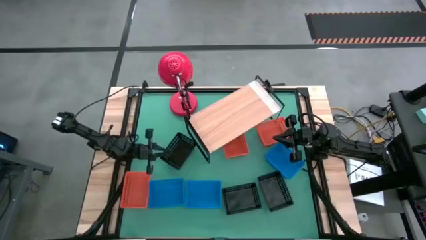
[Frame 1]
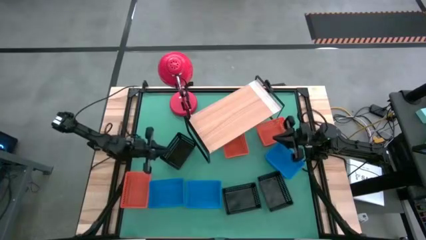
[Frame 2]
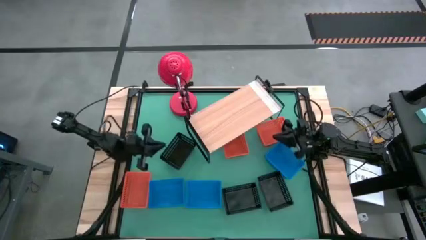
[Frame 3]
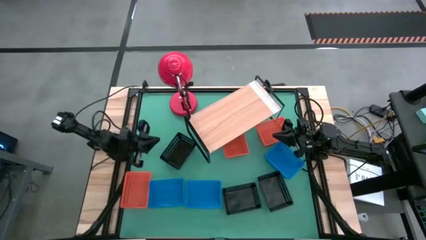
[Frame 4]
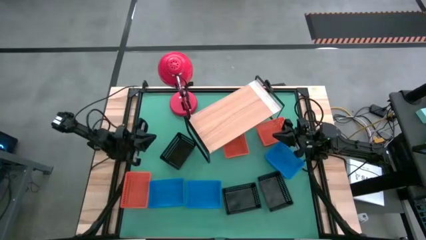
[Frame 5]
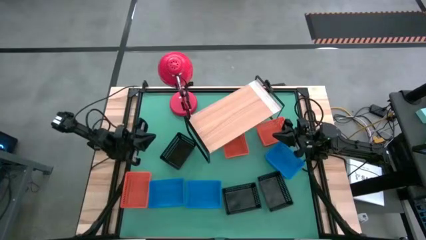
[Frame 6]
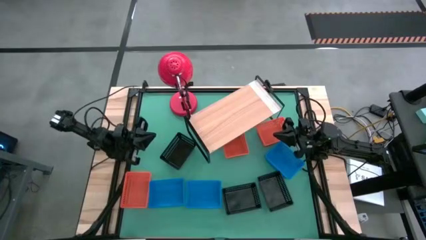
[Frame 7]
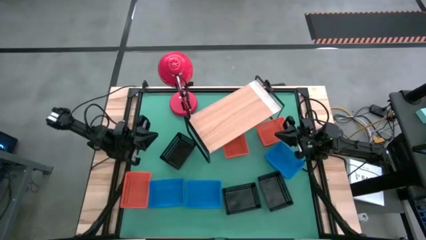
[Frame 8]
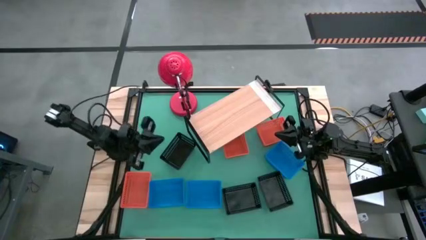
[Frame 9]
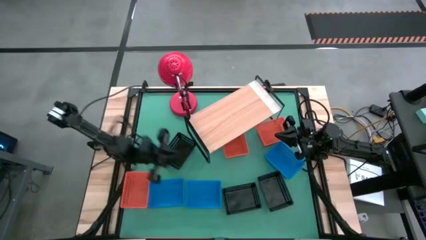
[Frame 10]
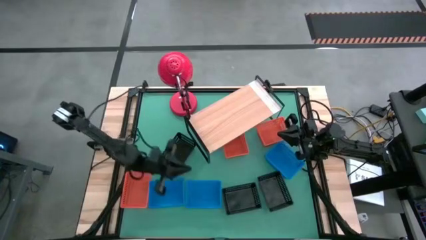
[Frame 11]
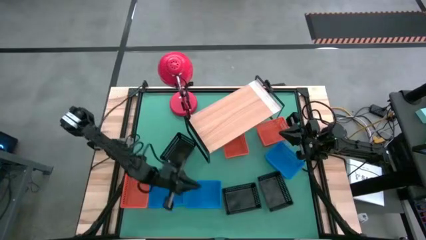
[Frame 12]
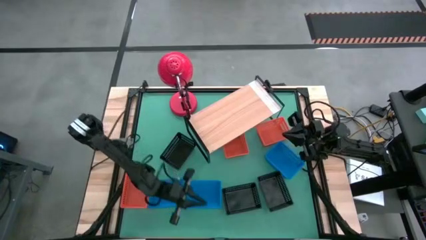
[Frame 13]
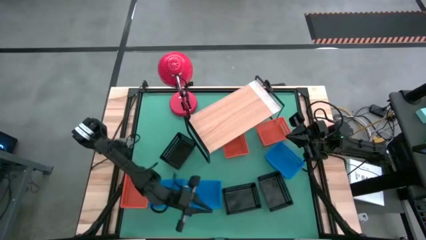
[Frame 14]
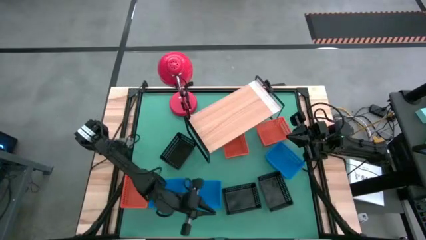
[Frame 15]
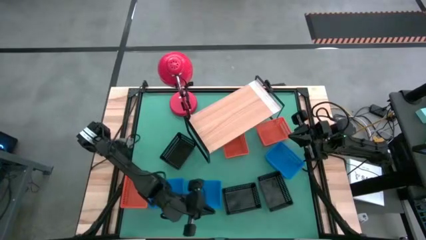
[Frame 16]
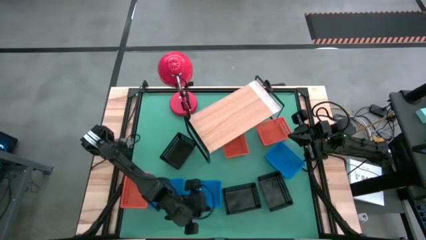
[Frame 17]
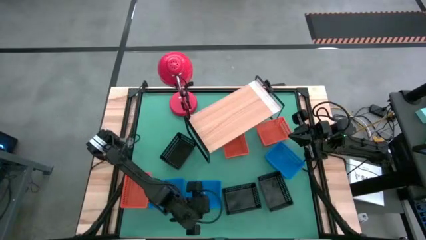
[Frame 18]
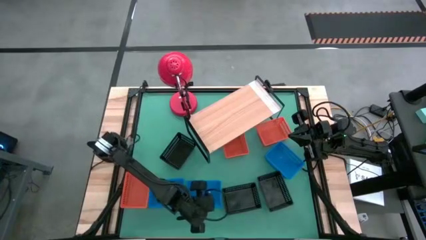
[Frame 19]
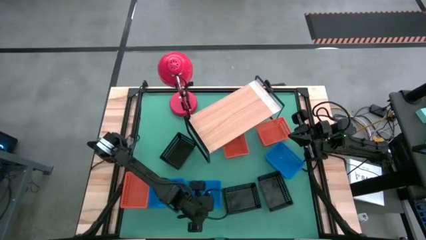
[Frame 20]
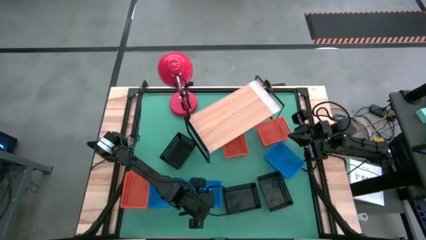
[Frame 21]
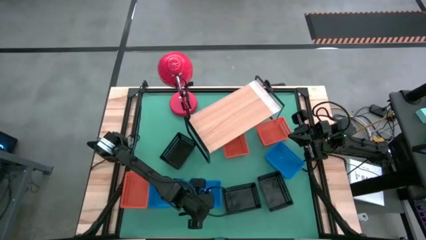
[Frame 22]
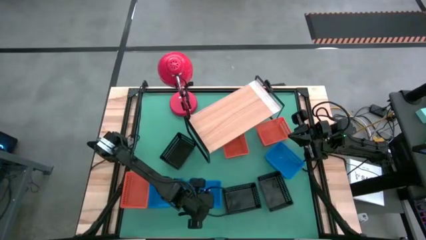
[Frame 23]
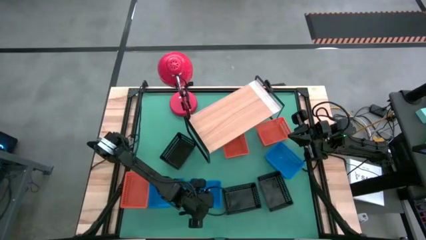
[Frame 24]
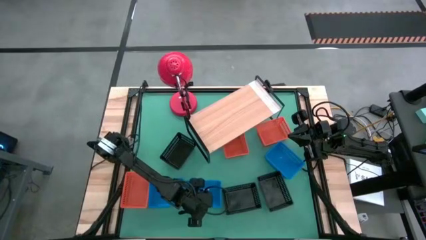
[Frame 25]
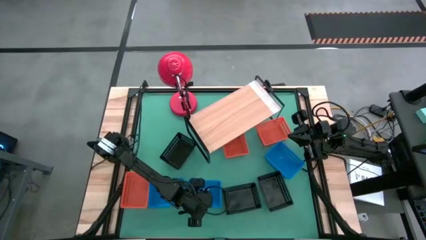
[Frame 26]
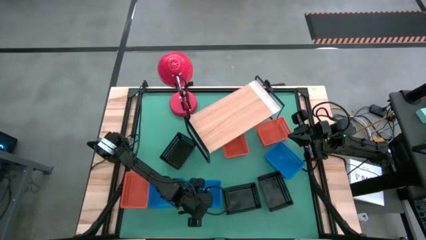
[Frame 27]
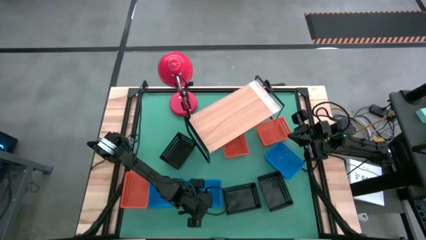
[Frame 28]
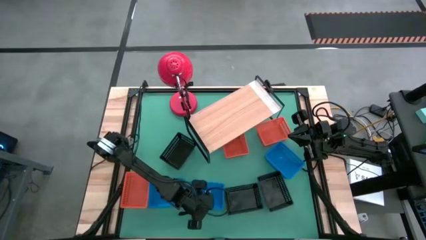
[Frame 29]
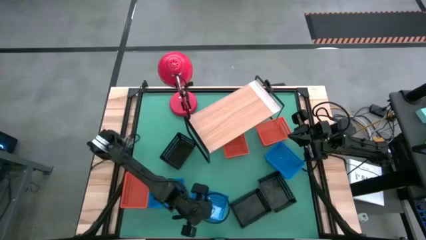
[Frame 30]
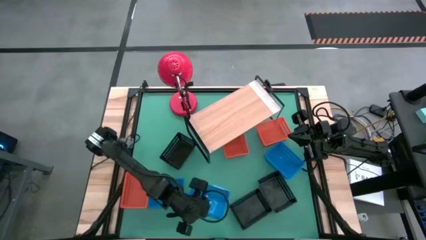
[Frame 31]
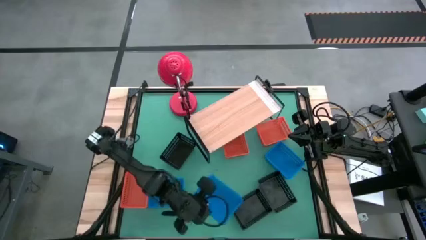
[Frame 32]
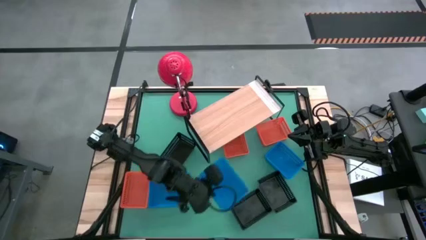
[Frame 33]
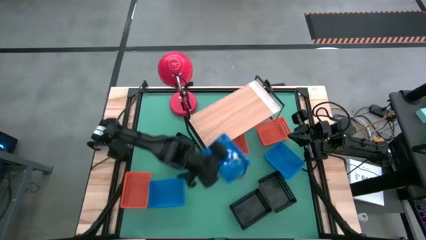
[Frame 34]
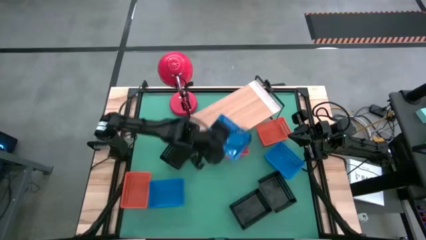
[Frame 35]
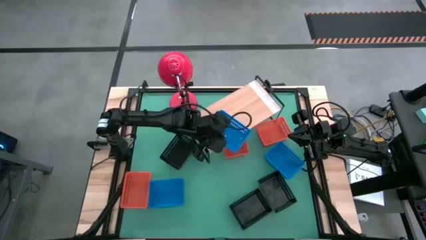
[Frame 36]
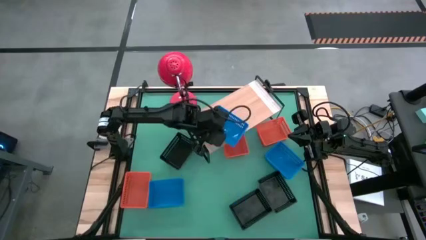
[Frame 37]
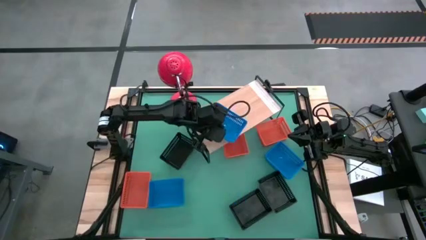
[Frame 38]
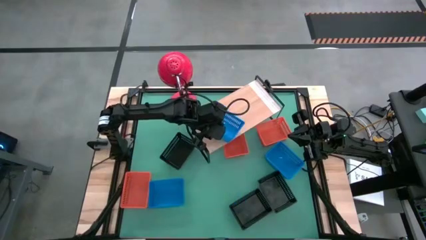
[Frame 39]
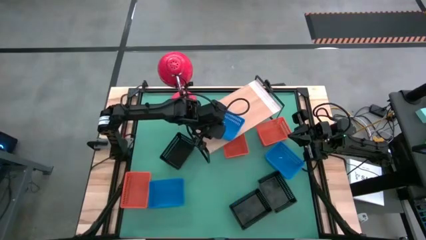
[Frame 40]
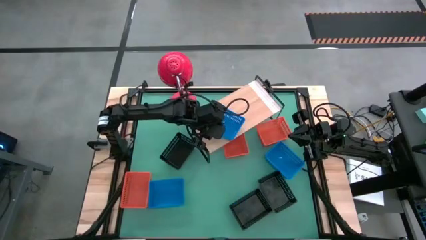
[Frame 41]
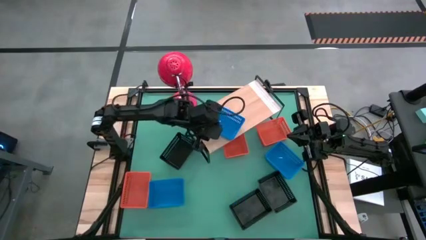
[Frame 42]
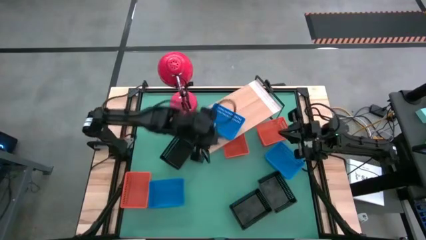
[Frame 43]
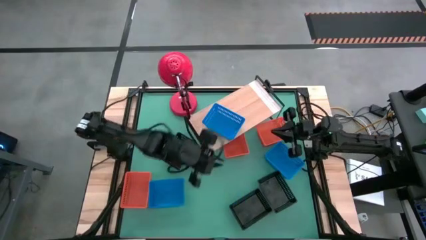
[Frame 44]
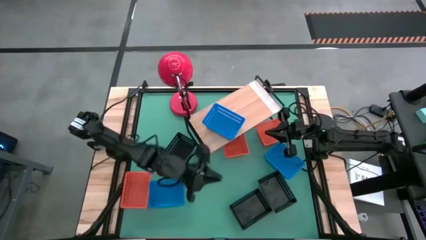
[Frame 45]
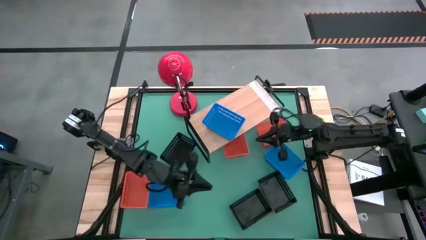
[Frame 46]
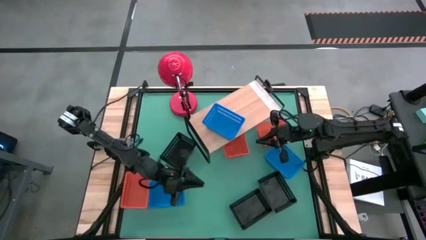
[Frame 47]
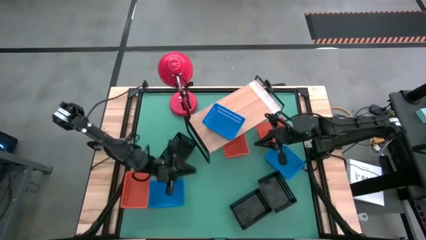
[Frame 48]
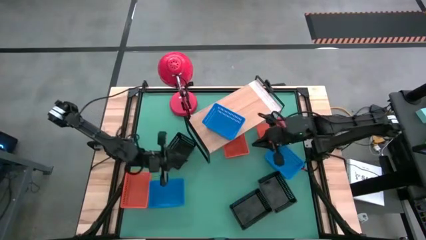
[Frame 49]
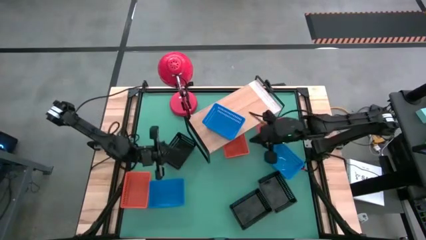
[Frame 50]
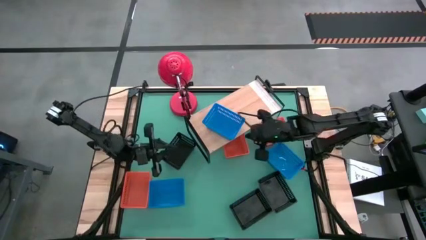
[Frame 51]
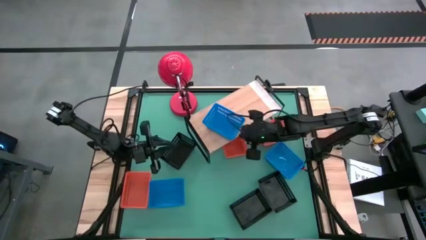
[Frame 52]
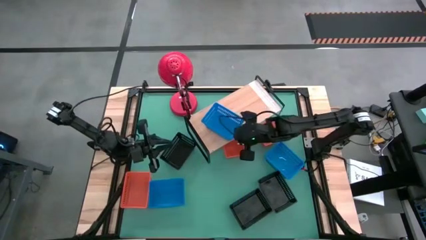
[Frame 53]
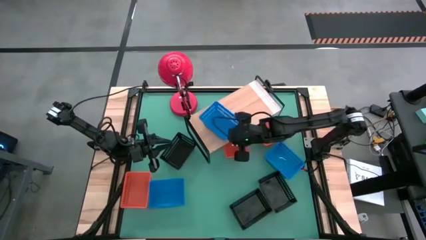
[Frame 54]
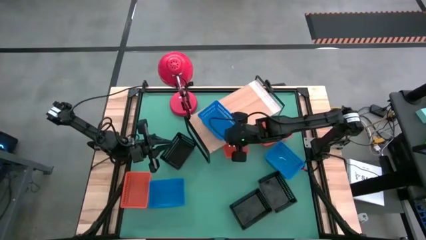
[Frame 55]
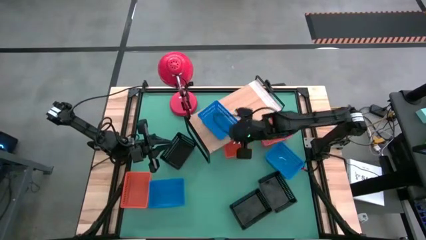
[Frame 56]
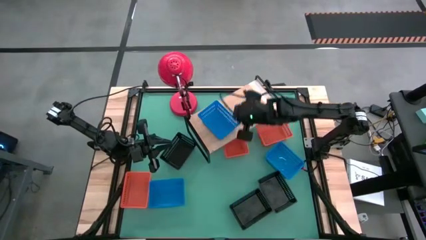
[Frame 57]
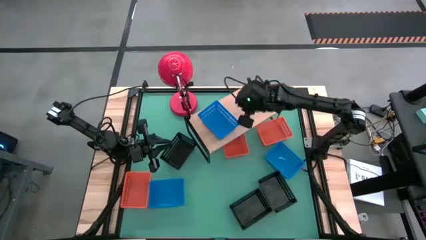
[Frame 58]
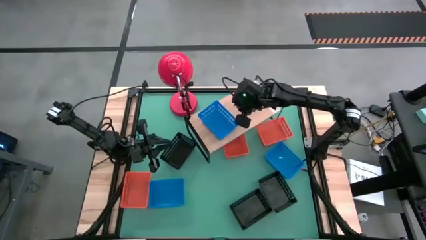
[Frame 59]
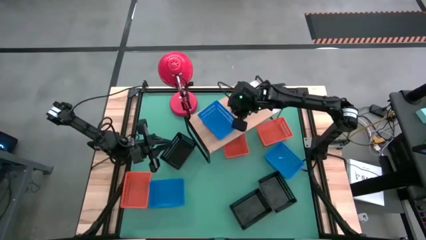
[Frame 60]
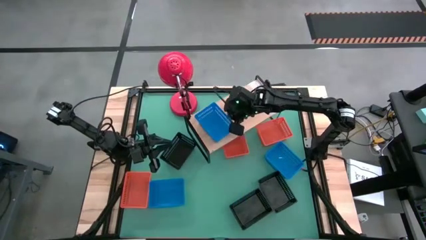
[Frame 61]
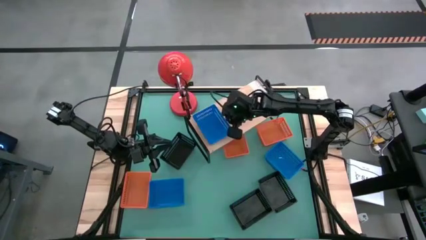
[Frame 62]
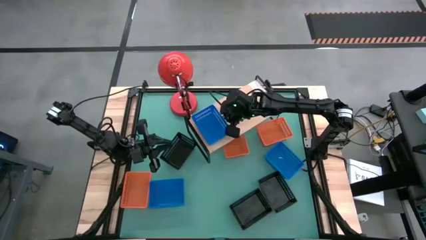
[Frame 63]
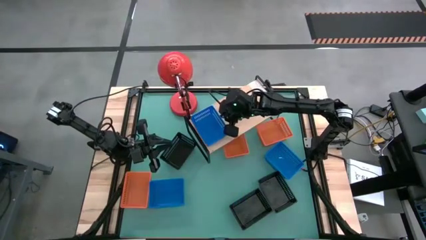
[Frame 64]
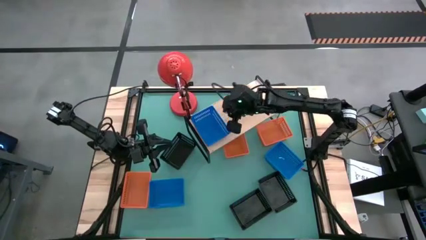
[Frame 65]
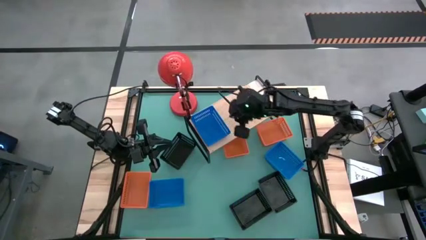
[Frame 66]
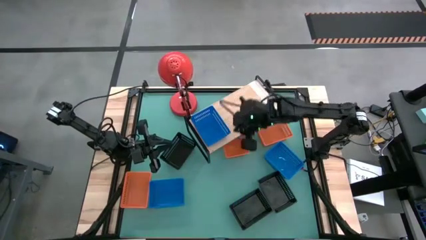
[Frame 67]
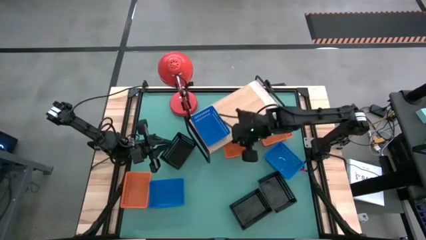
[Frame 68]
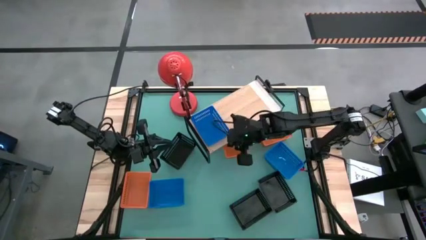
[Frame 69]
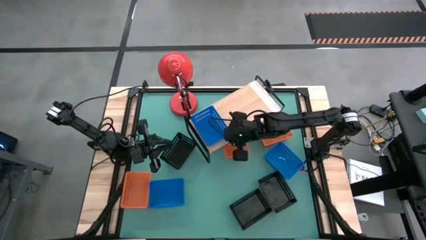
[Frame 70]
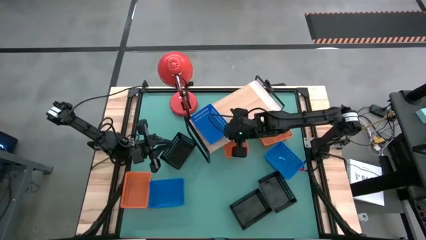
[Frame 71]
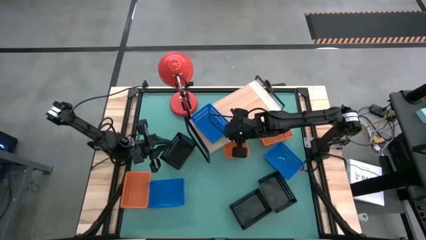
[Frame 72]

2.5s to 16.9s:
Task: Stack baskets on shelf by color
Put the middle blue basket on the shelf

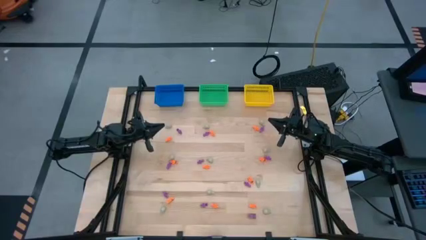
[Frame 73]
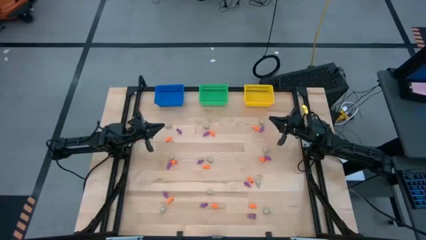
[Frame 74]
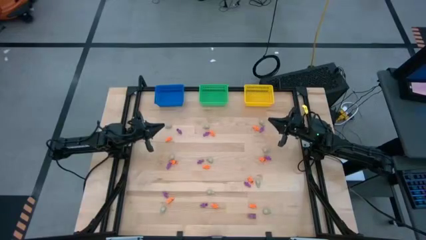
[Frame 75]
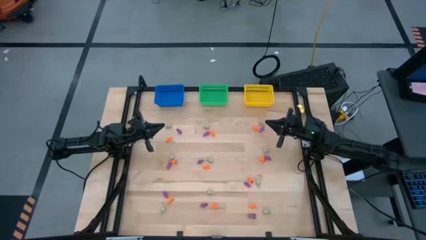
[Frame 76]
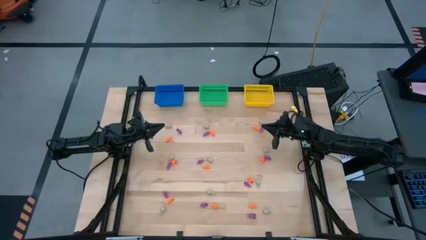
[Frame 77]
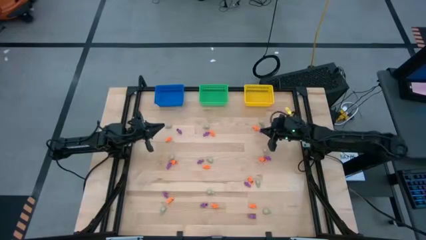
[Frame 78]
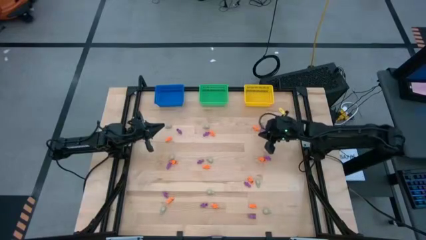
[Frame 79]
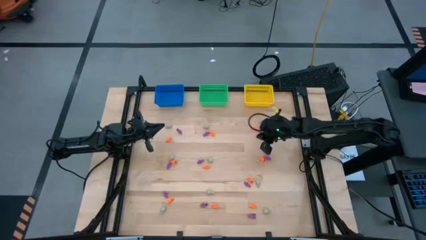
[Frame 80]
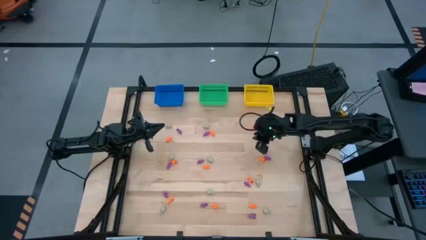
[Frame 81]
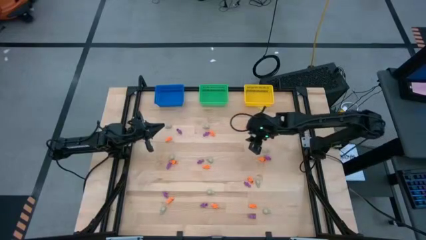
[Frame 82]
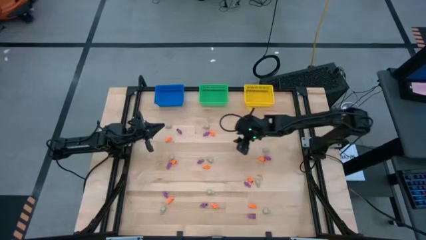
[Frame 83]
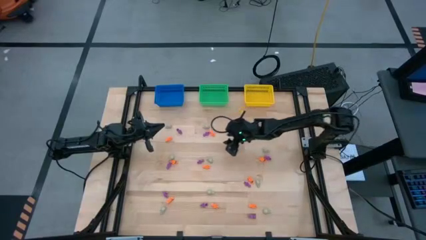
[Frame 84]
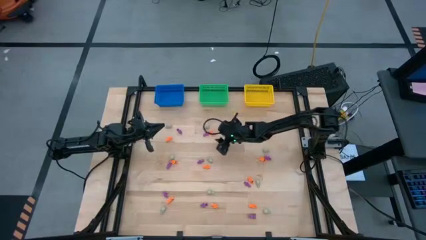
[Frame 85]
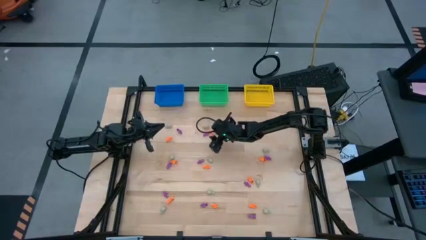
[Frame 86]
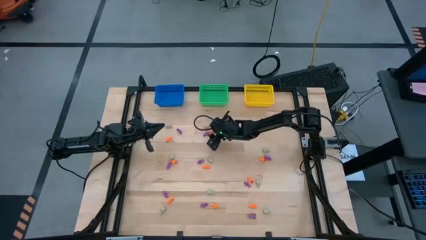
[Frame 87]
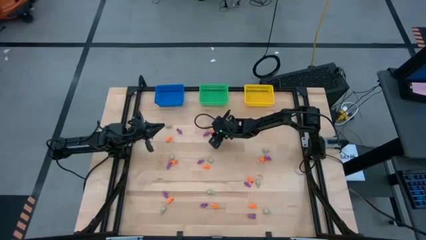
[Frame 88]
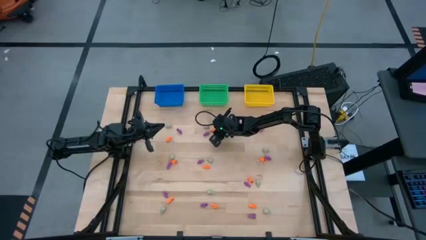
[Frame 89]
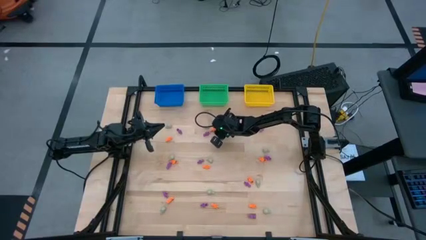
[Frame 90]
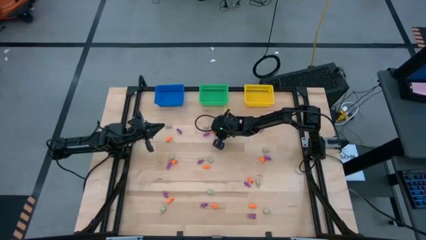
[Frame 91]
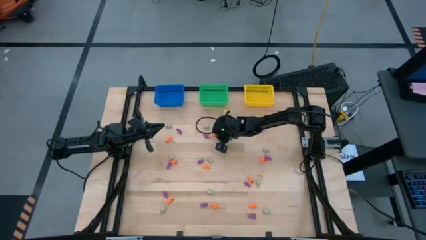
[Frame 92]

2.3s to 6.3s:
Task: Sort Halloween decoration
Put the orange skeleton toy into the green basket
